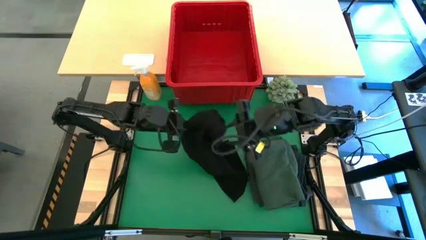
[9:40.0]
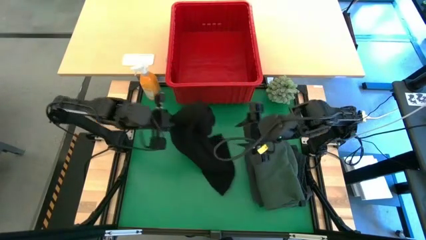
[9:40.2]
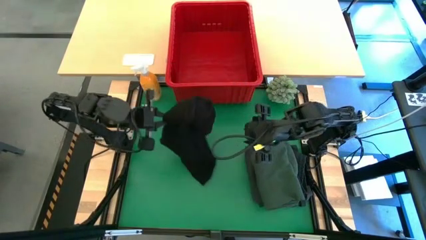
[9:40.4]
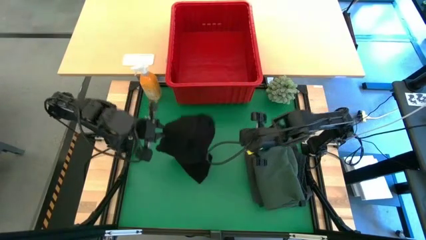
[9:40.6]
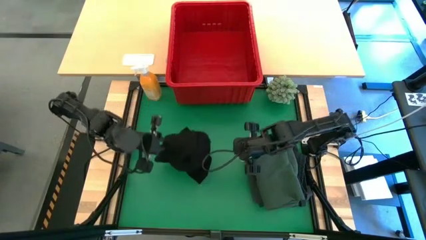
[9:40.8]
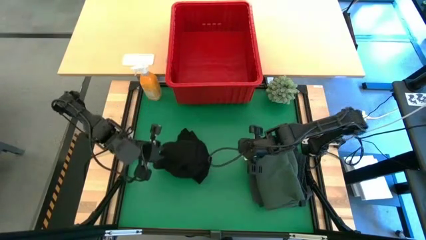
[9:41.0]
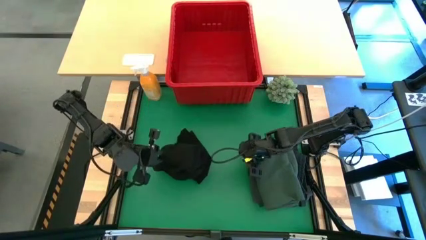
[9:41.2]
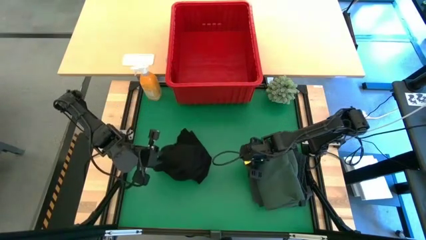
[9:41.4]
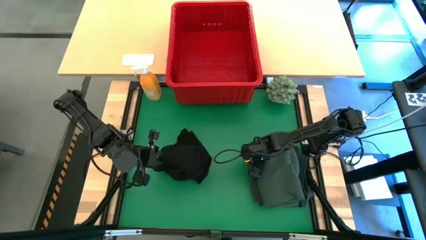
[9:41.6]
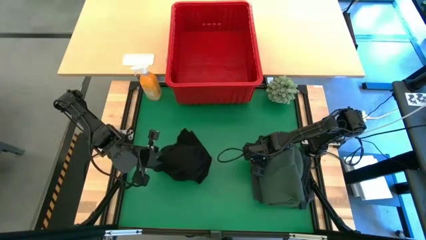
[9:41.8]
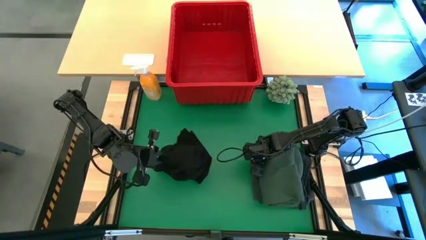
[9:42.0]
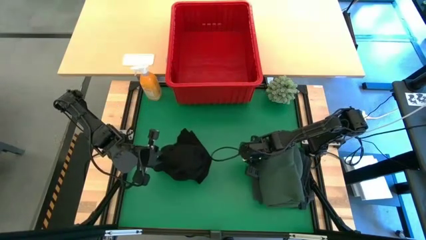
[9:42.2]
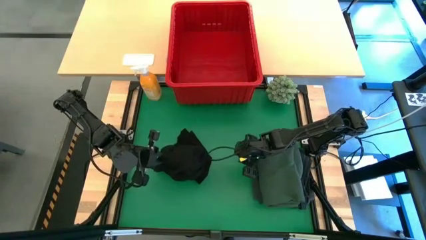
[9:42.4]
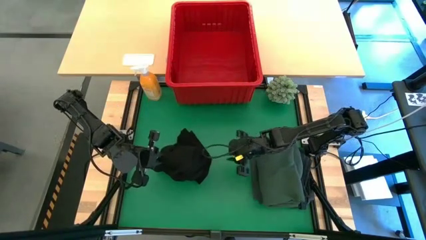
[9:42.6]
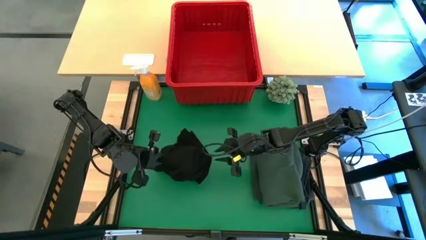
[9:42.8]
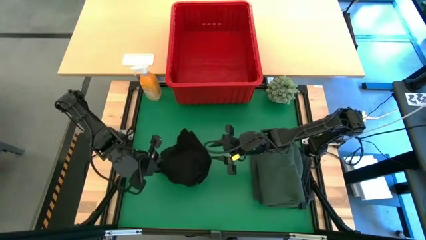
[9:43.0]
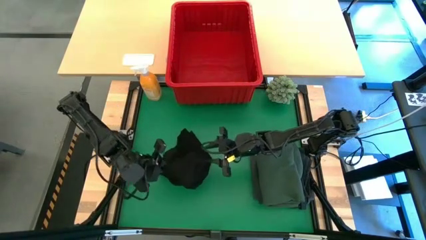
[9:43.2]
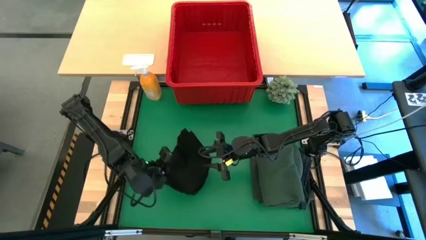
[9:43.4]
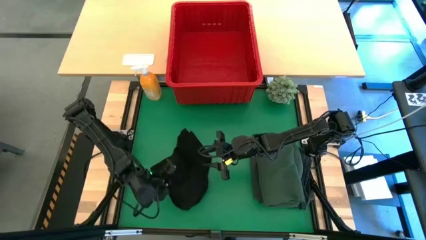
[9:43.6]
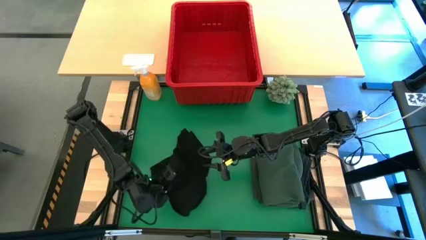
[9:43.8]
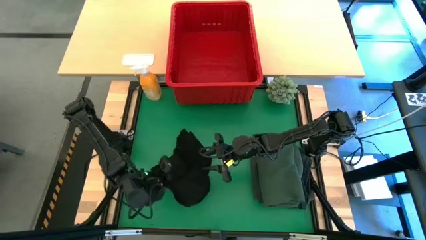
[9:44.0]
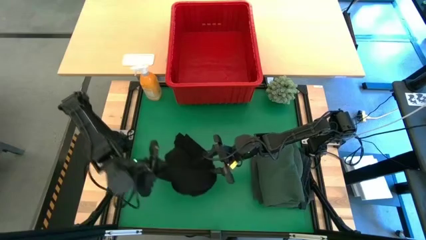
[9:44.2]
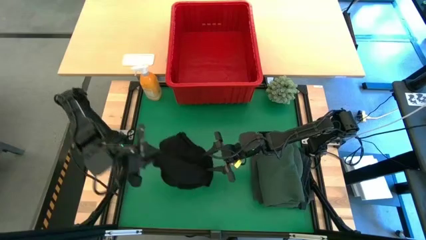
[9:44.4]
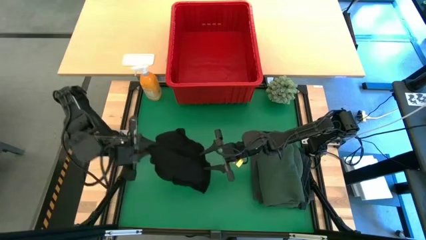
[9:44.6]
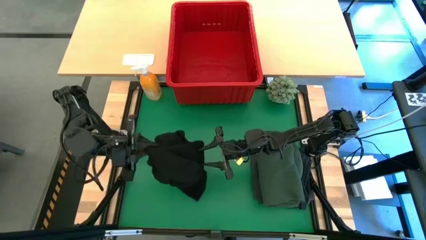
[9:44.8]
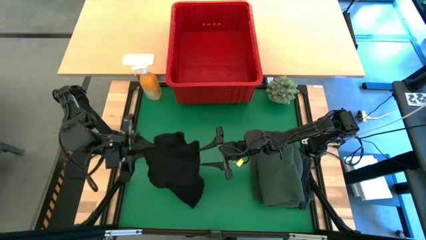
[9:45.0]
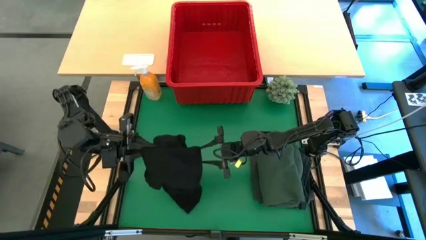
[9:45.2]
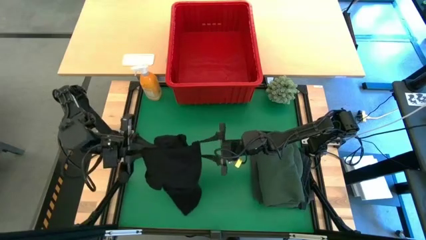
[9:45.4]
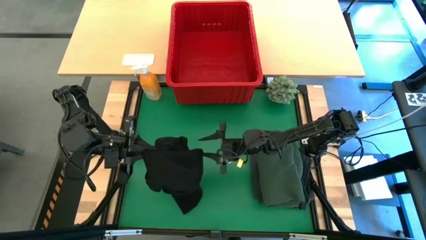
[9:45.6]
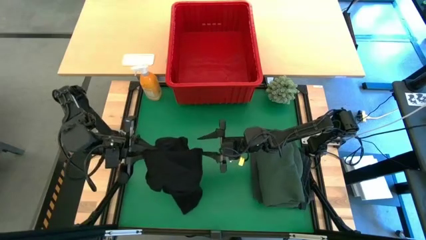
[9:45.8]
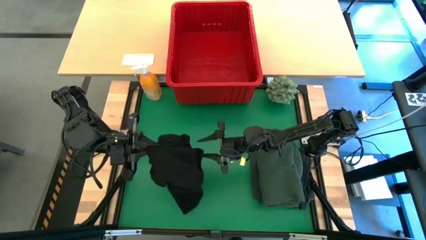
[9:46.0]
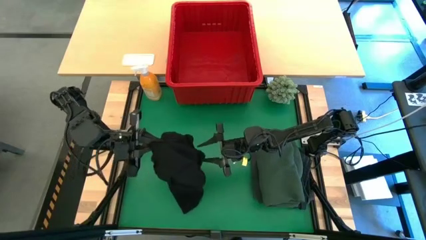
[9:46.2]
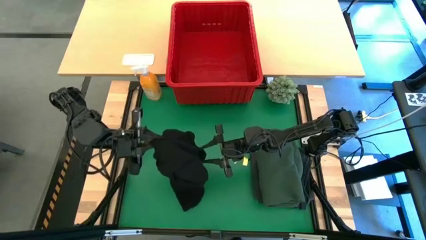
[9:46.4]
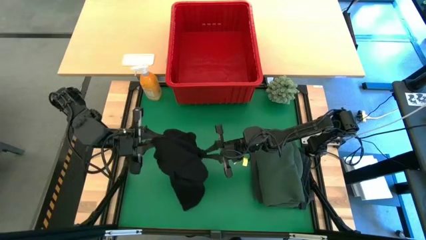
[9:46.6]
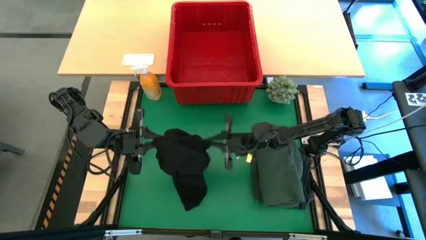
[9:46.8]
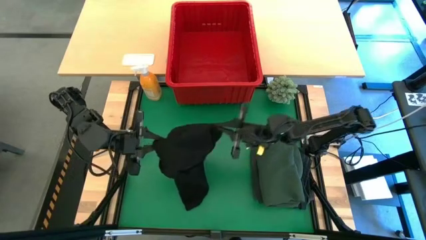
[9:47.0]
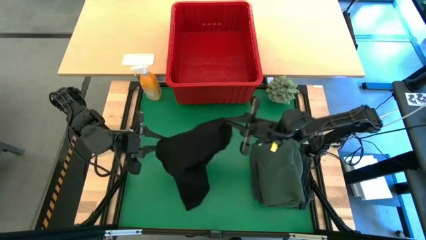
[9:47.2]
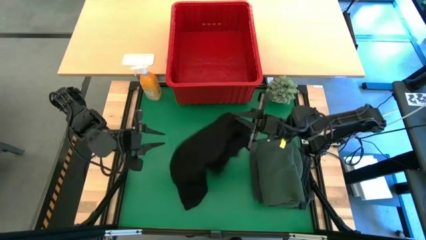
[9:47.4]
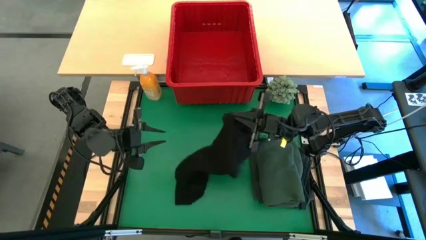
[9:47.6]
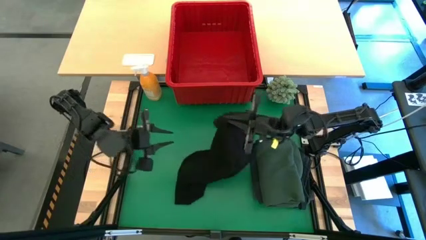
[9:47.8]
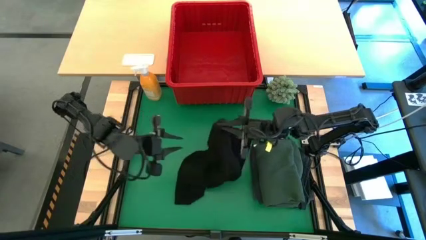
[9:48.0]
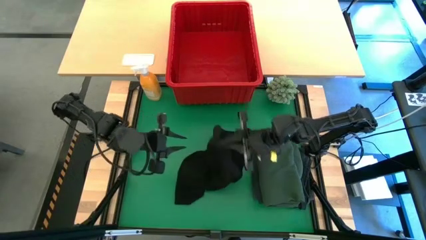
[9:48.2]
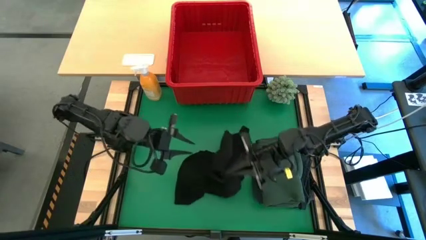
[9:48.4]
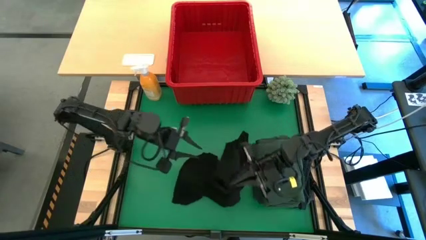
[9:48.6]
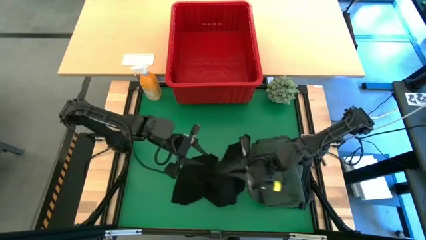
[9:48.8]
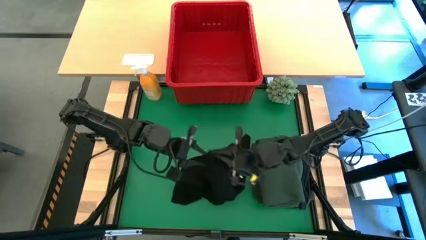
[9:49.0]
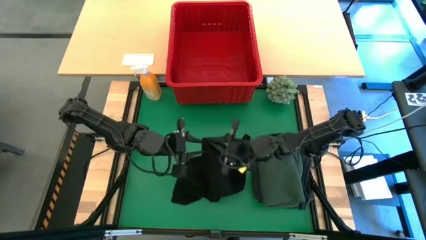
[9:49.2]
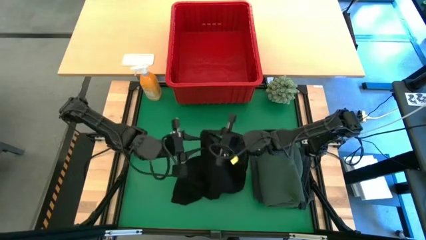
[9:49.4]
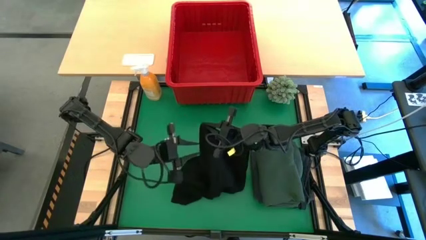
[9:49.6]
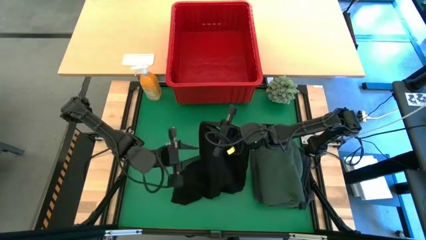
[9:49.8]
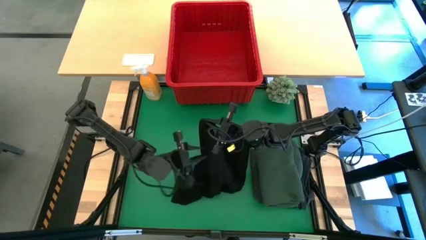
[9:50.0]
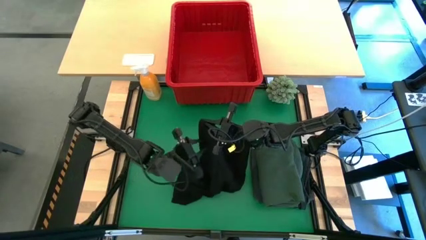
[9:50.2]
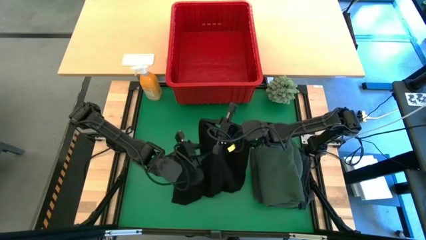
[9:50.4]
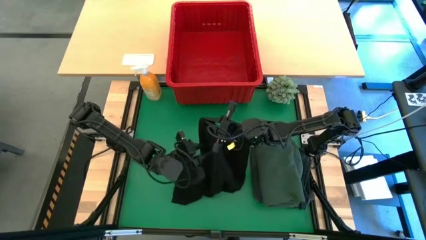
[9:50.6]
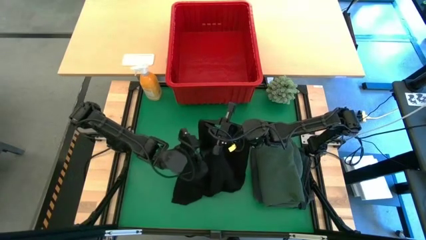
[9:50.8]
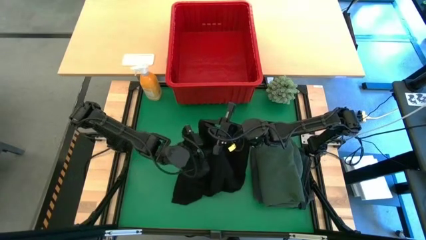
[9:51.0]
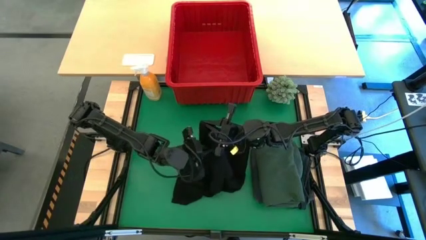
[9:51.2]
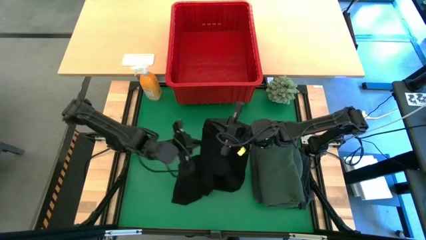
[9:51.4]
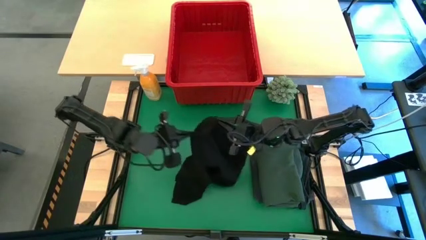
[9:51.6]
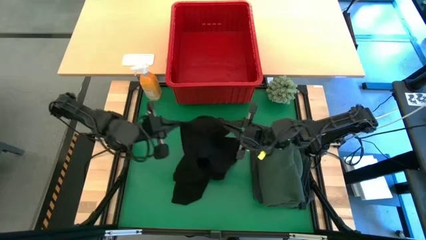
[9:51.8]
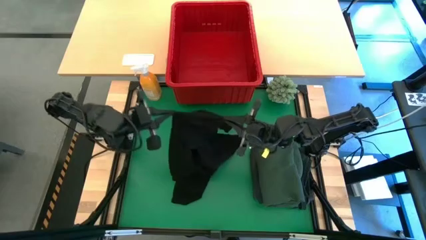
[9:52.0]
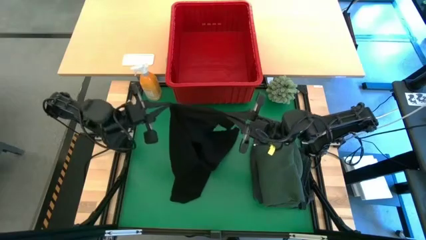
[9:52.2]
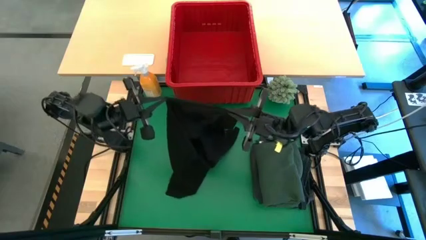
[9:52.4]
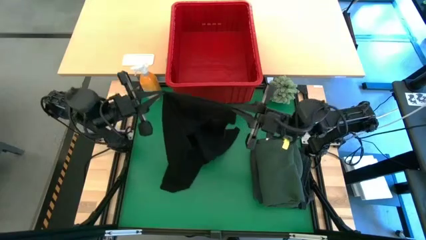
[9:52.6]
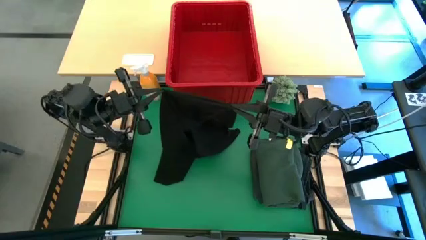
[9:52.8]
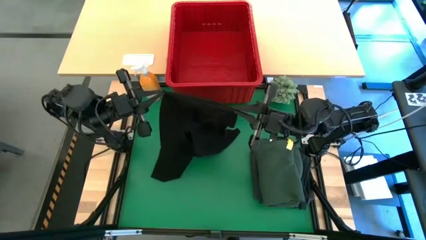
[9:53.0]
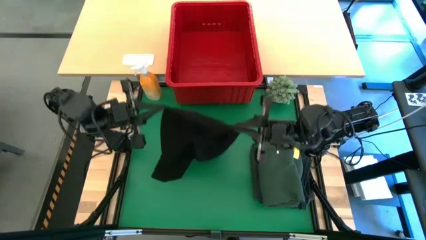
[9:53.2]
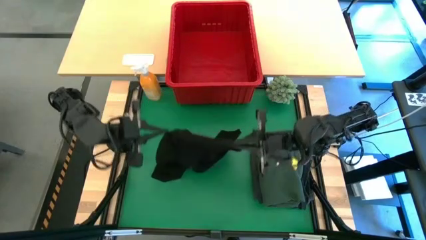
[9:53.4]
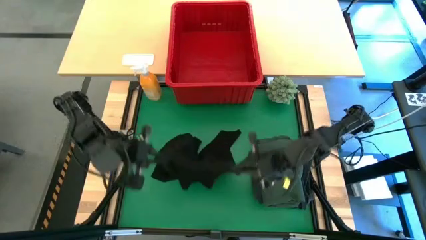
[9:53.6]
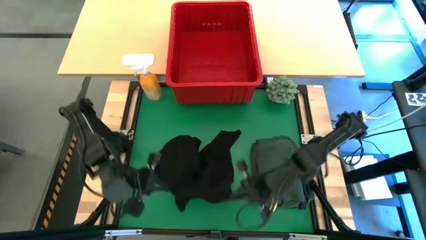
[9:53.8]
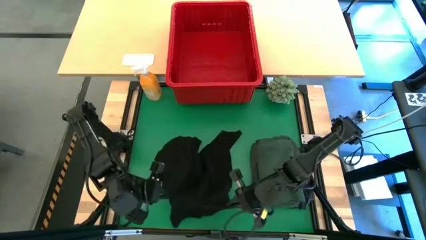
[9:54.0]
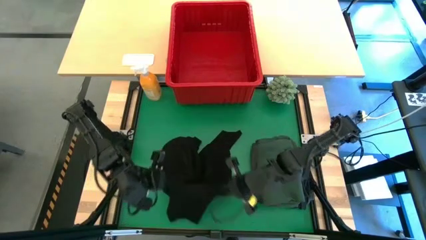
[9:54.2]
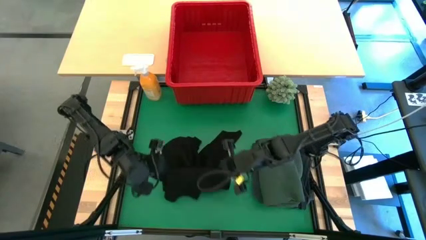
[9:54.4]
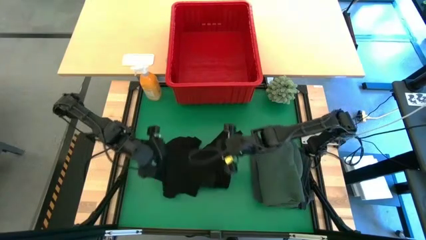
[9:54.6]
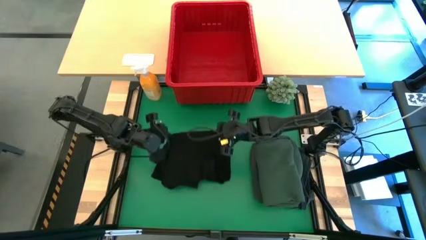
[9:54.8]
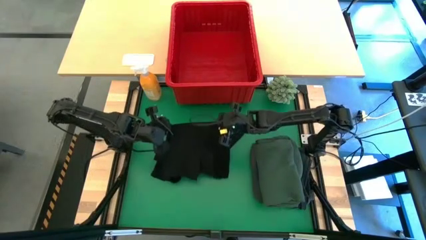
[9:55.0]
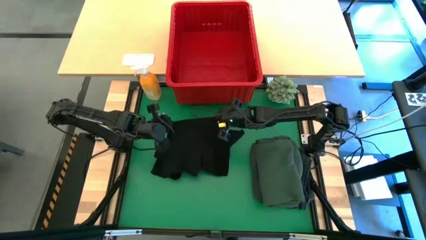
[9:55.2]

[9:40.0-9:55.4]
Task: Fold Laundry from Bin
Fold the black shirt

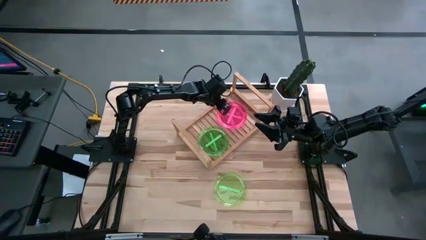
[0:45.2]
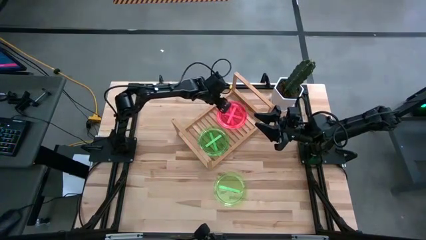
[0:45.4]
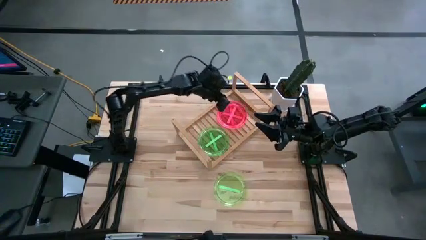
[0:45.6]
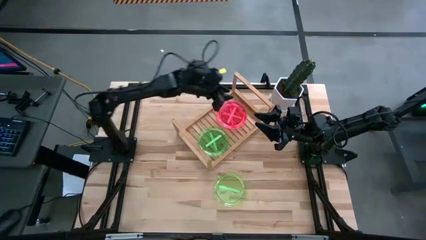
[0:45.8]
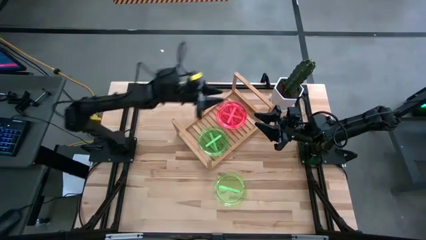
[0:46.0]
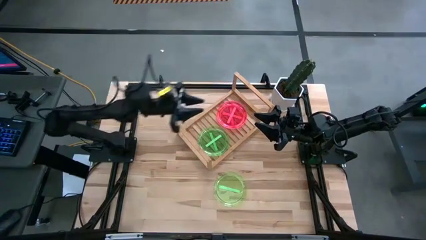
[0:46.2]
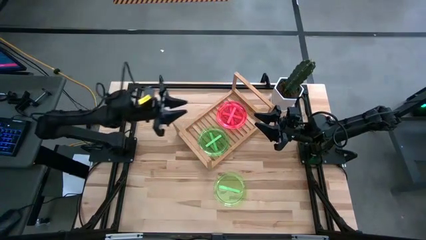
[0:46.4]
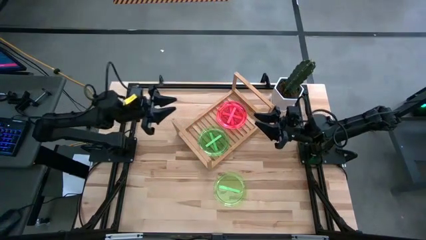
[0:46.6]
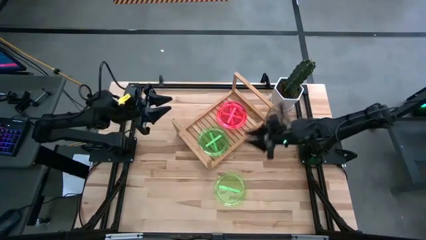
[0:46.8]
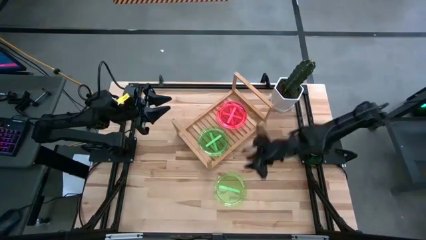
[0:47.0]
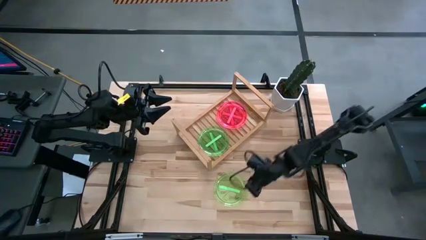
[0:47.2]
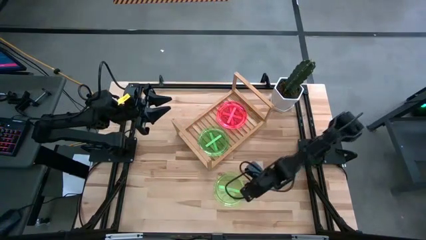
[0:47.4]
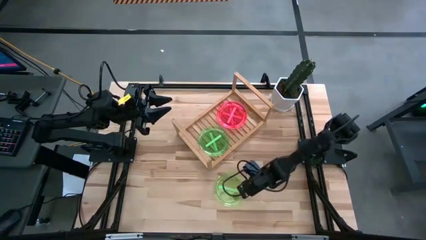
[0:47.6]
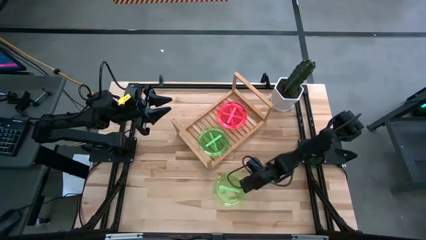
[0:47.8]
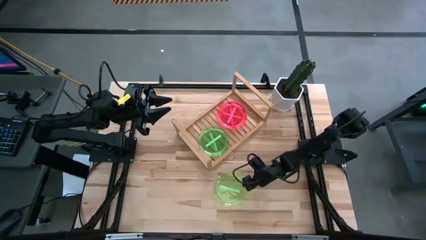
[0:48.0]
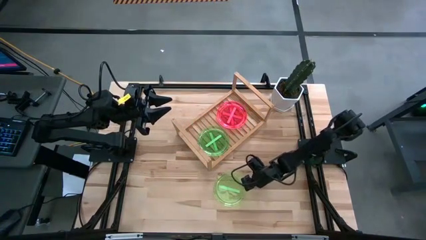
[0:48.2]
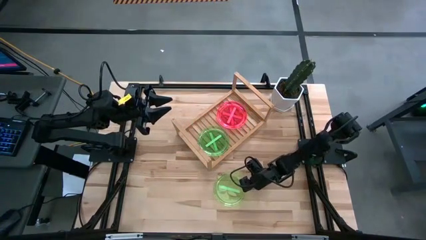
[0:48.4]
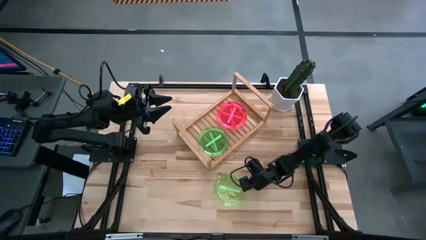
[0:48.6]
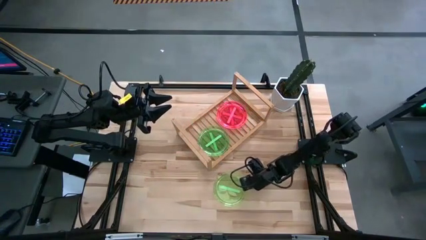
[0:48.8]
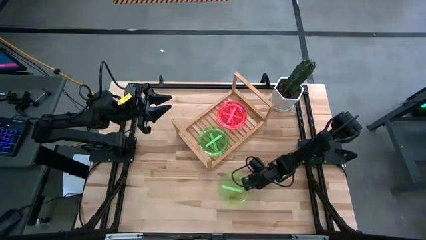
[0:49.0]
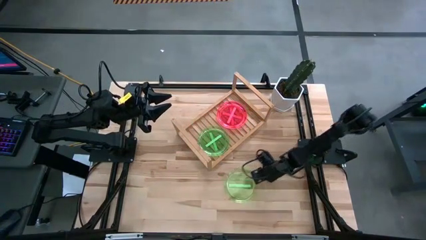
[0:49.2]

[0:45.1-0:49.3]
Task: Place and stack plates onto a shelf
Stack the green plate on top of the other green plates on the shelf
